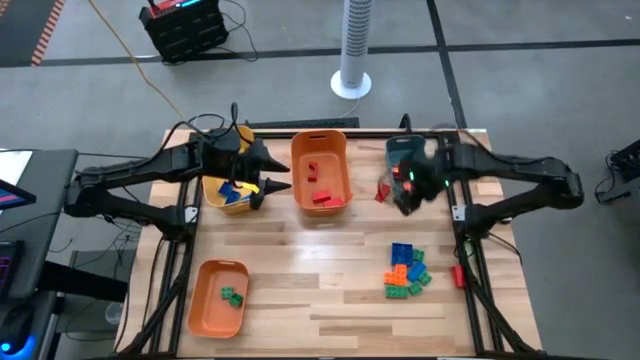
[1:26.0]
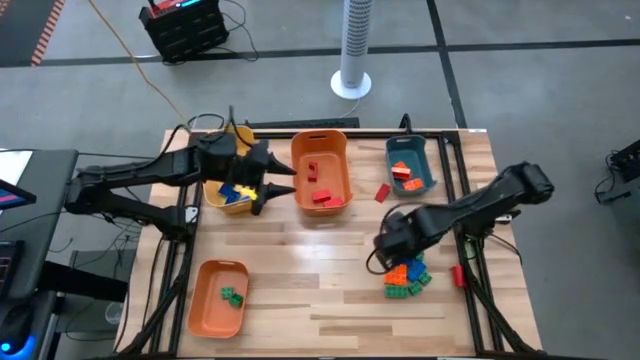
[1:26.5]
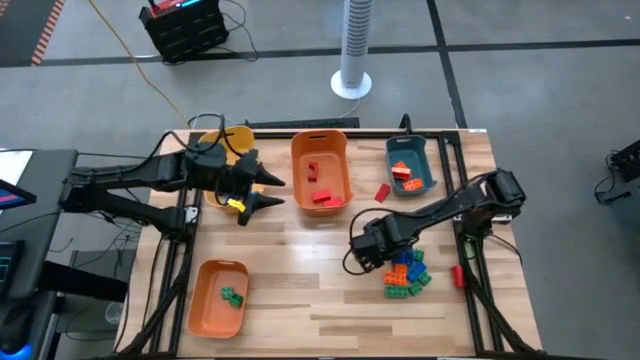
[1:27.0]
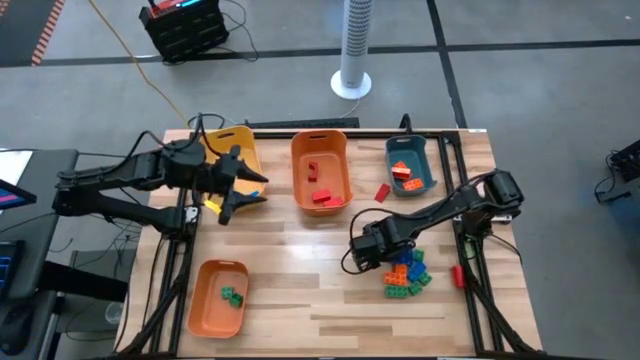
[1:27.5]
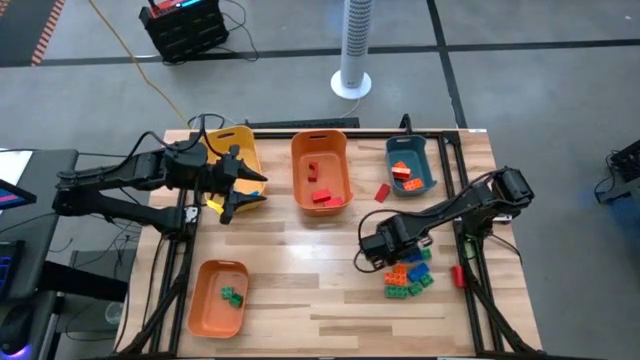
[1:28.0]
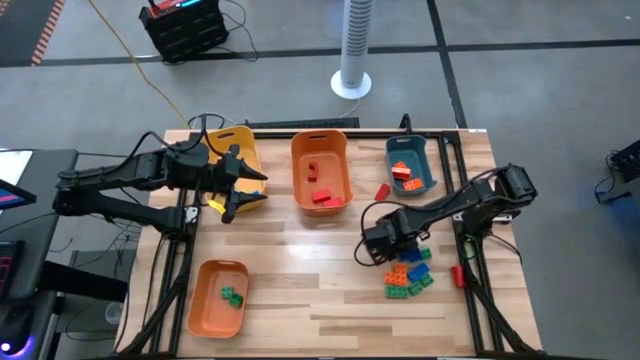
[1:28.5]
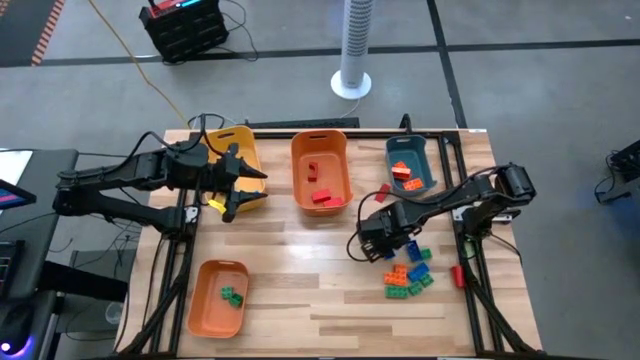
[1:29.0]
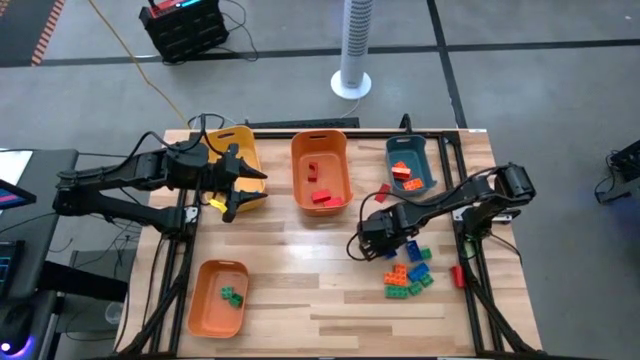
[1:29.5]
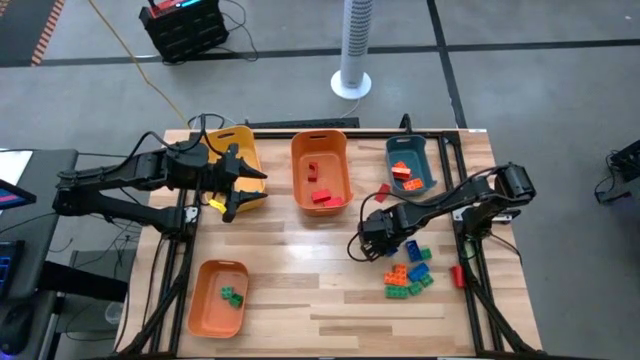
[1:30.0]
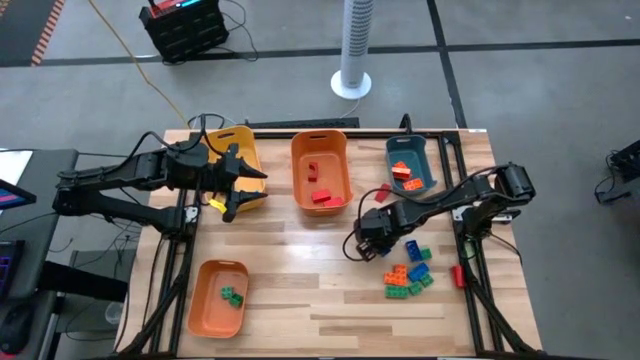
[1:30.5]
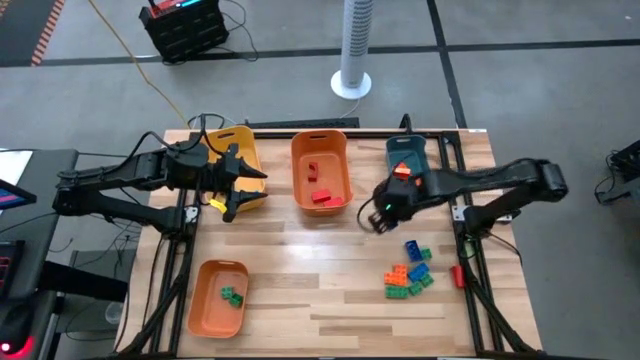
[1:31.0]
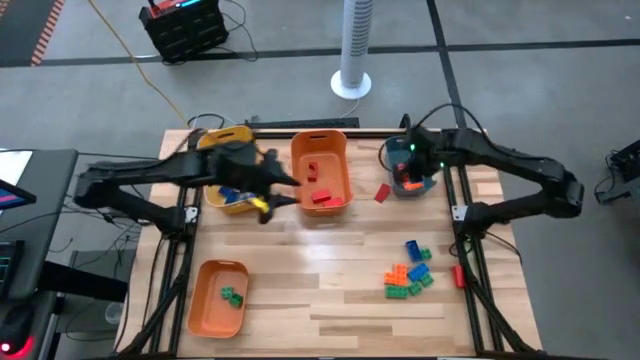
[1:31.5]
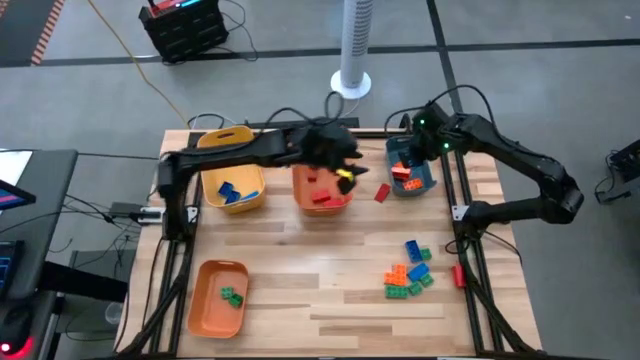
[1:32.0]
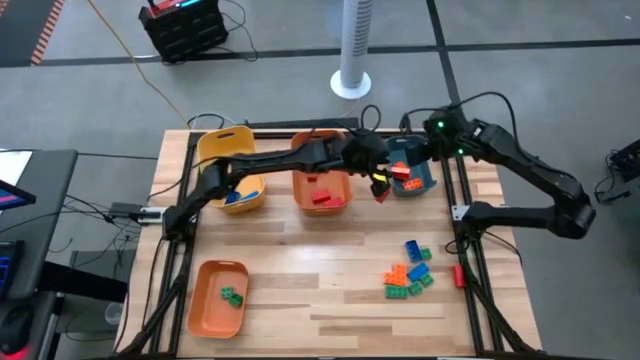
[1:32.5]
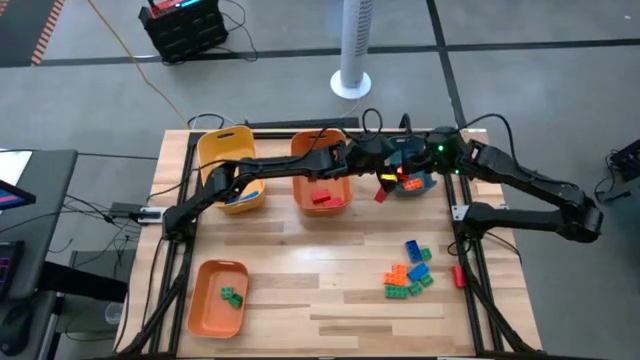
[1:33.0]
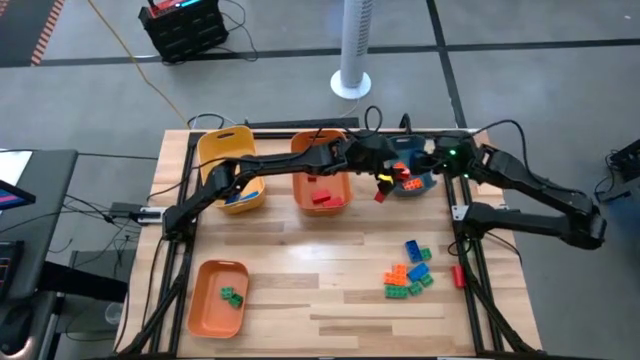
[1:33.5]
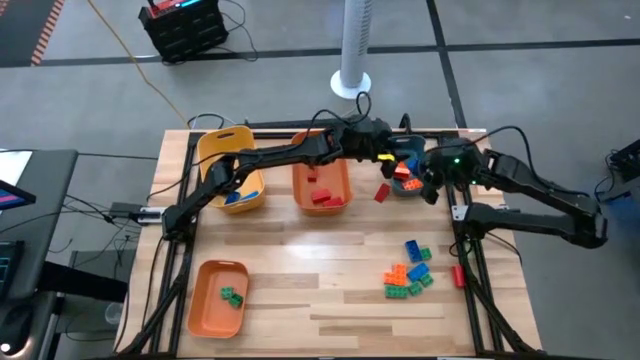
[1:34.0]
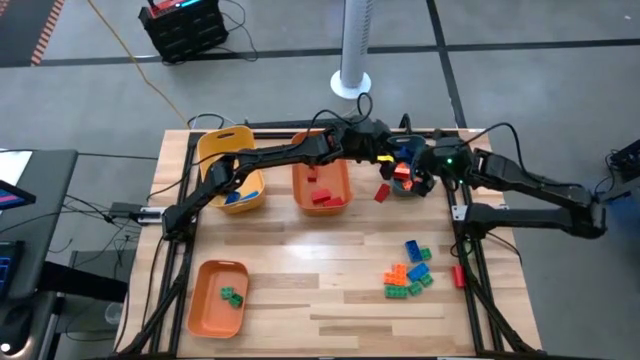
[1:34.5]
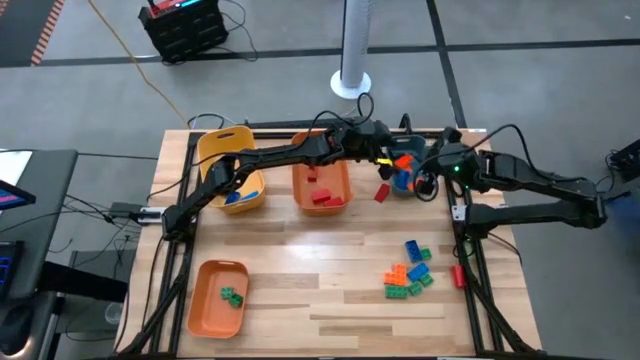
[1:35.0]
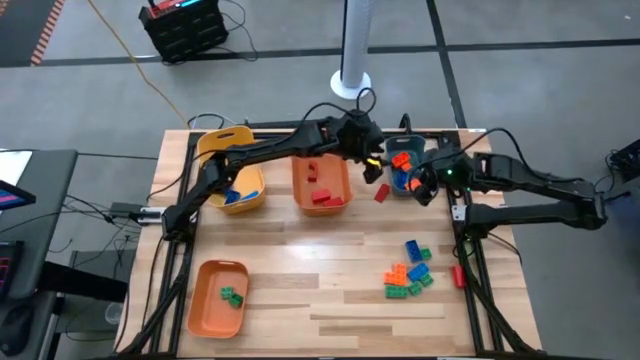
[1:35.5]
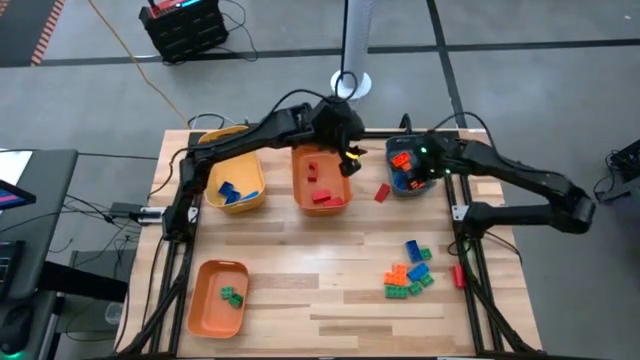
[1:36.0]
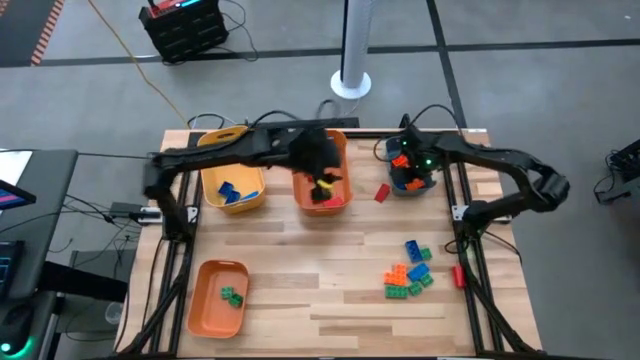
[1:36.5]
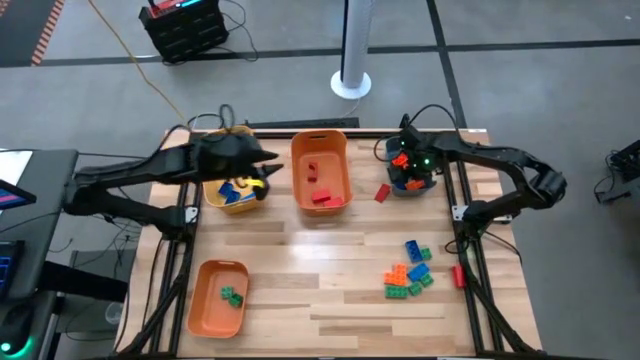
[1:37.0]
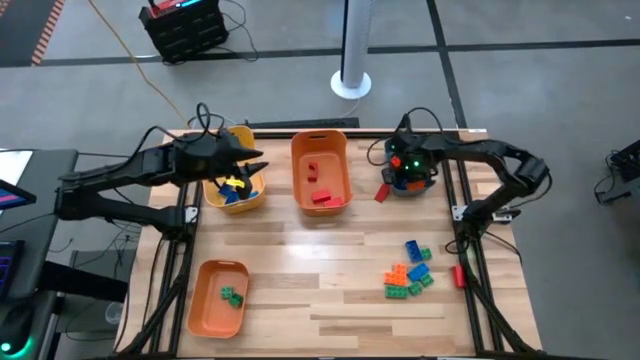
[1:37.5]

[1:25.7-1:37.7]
Task: Sort blocks
Put the blue game piece into the yellow bin

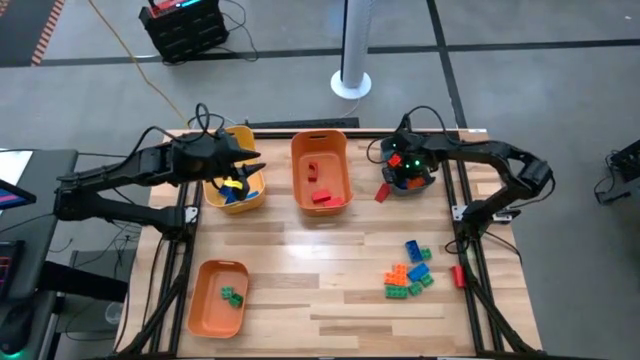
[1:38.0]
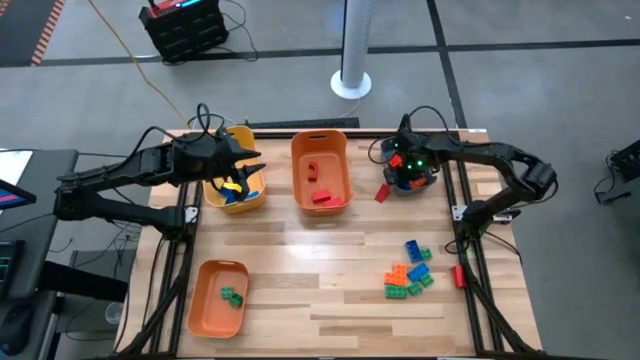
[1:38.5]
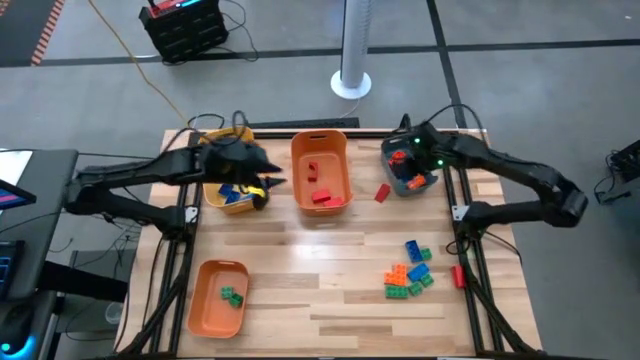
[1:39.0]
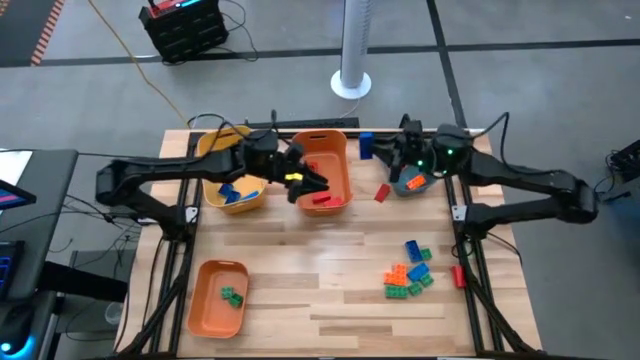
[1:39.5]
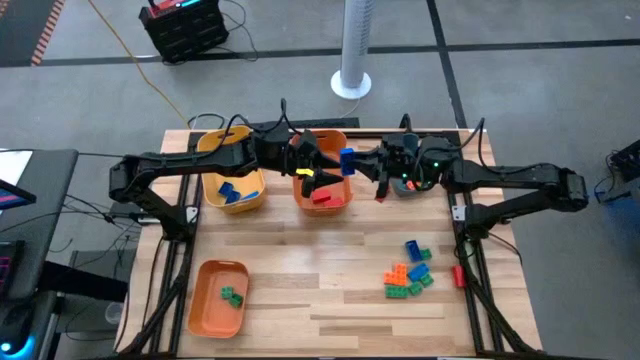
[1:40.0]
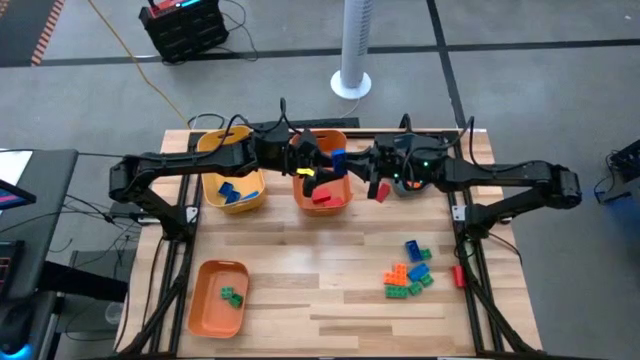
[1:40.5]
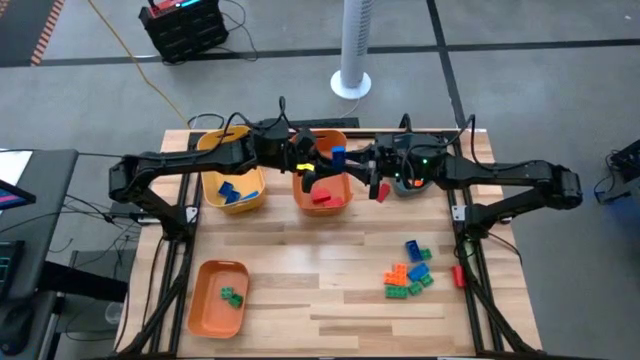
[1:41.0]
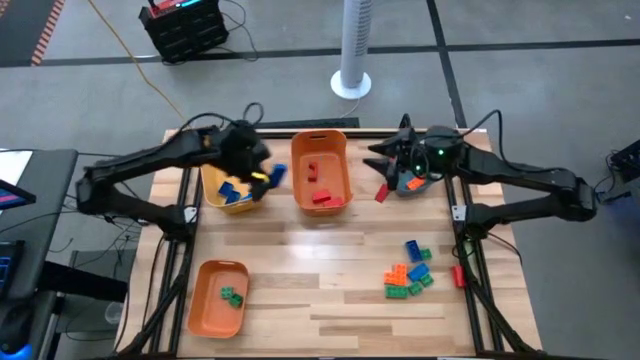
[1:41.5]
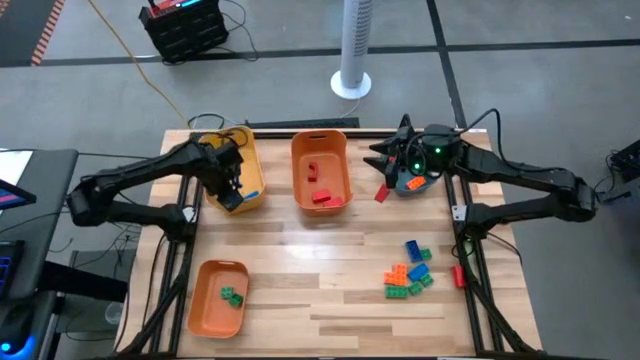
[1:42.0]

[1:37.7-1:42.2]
Put the blue game piece into the yellow bin

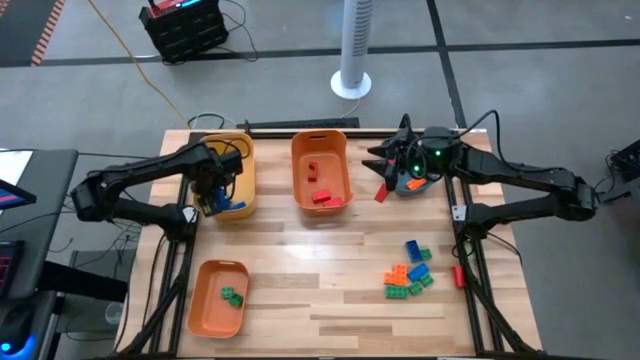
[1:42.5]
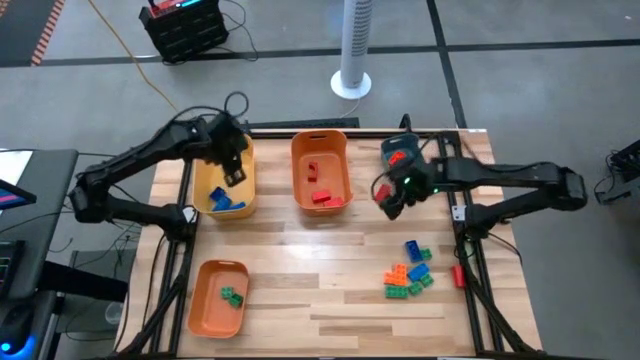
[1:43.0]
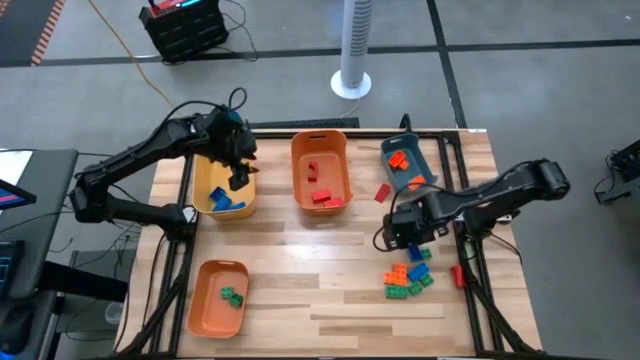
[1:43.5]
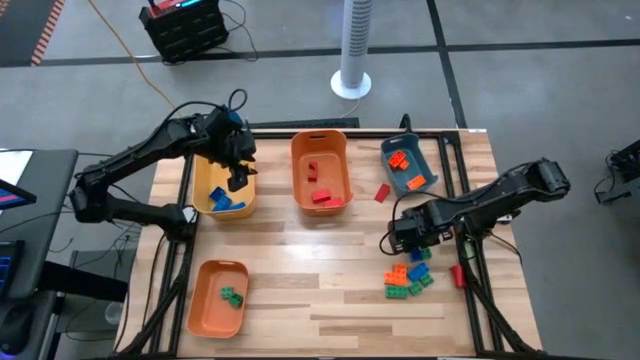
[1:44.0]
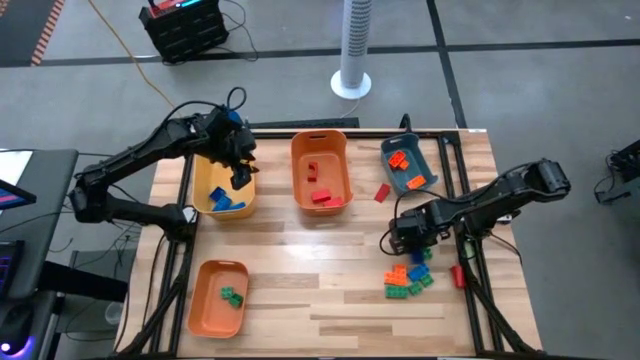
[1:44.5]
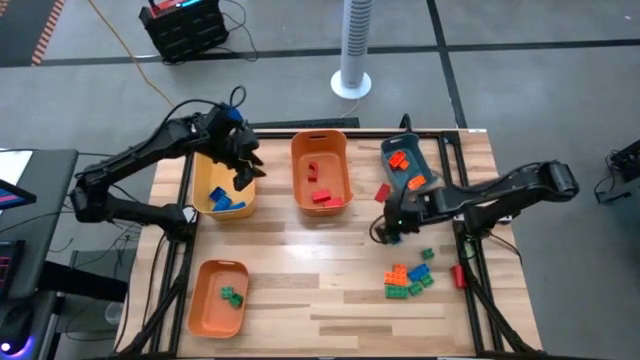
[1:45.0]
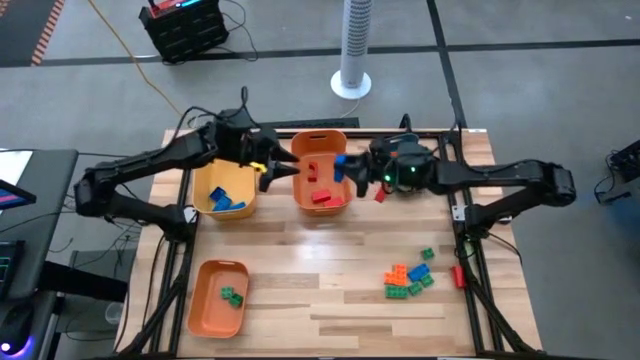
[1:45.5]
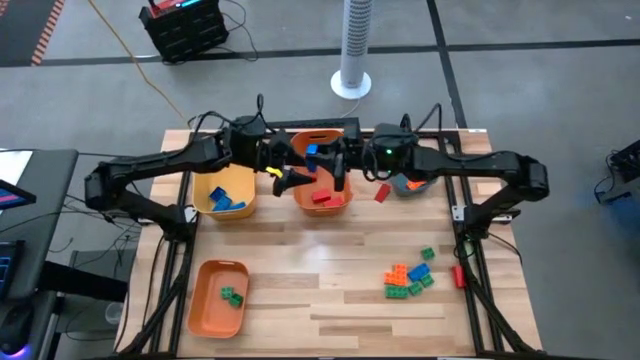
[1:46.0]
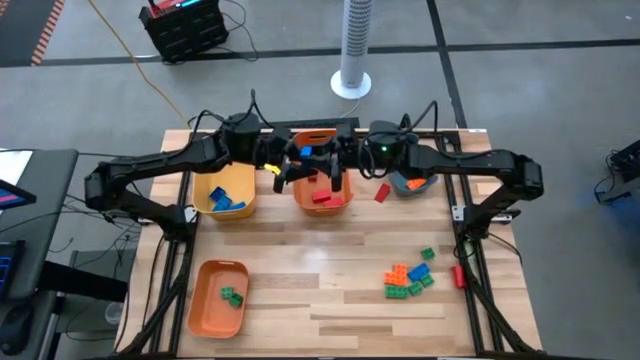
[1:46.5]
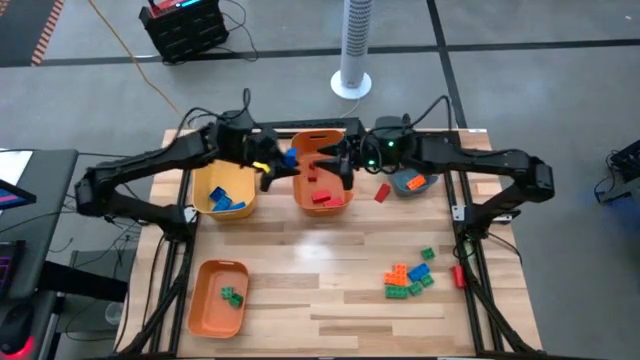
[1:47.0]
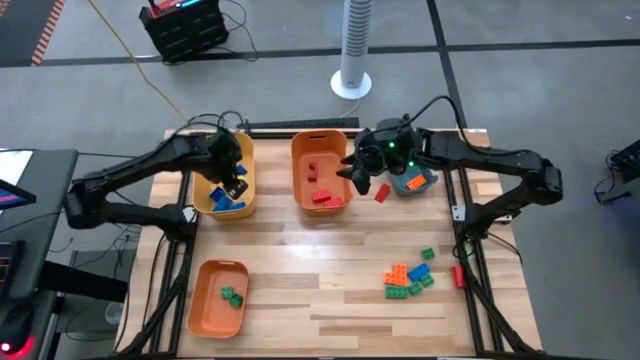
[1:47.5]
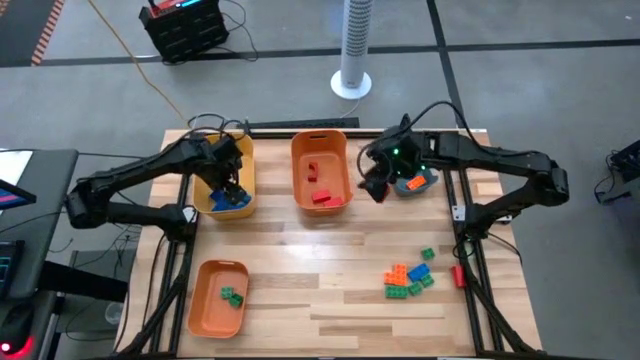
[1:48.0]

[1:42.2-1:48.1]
Put the blue game piece into the yellow bin
